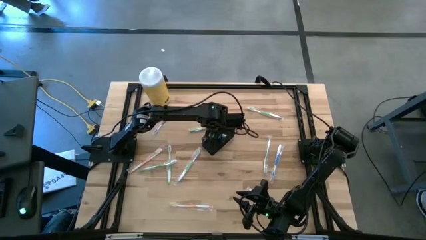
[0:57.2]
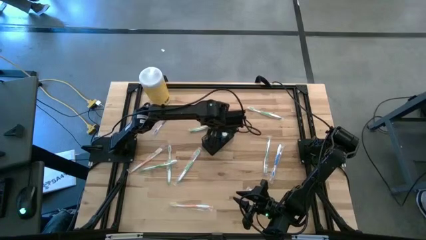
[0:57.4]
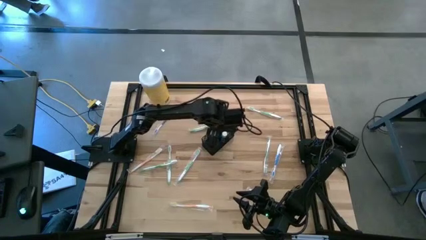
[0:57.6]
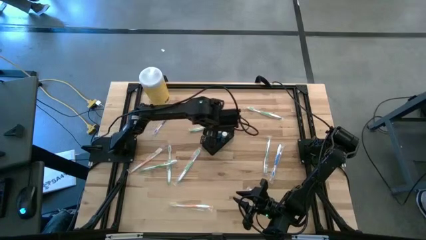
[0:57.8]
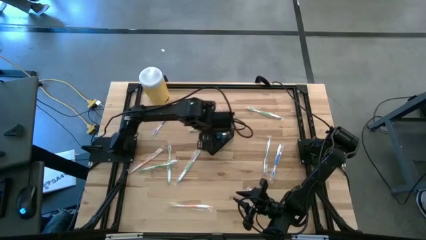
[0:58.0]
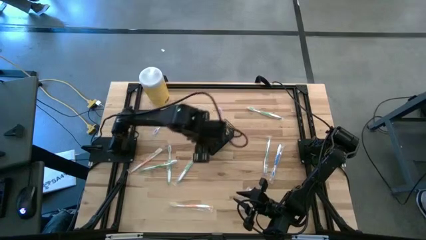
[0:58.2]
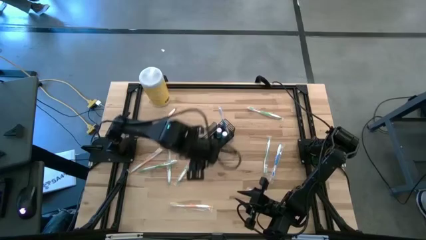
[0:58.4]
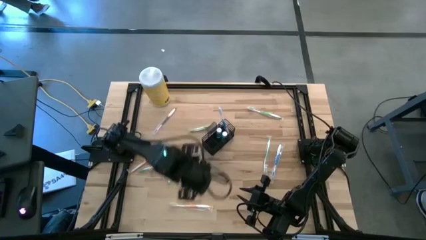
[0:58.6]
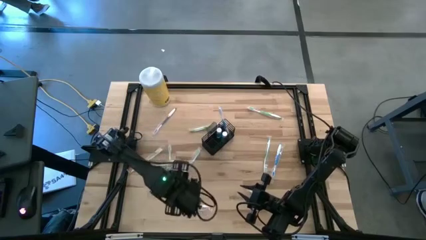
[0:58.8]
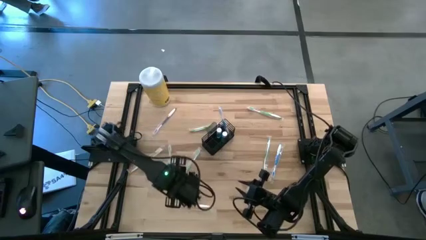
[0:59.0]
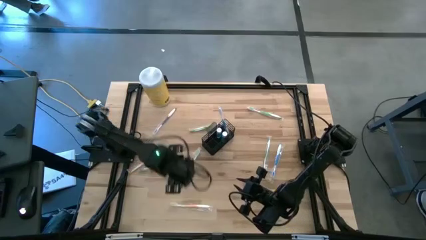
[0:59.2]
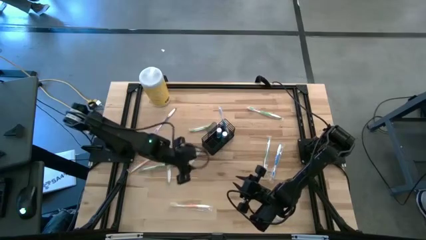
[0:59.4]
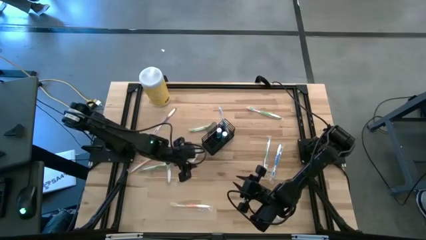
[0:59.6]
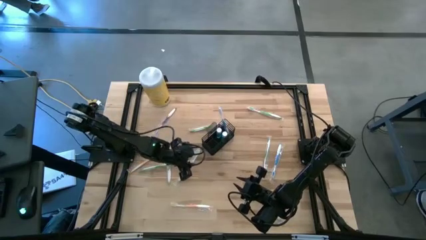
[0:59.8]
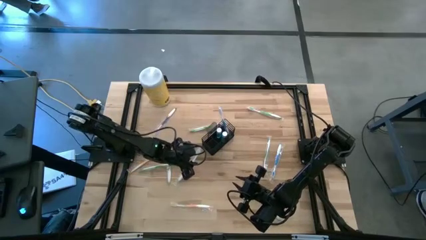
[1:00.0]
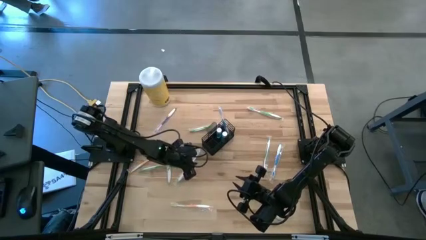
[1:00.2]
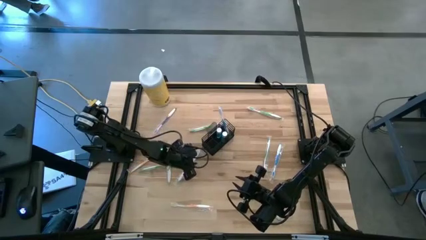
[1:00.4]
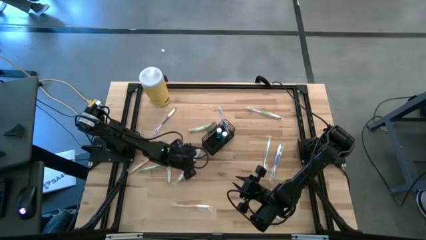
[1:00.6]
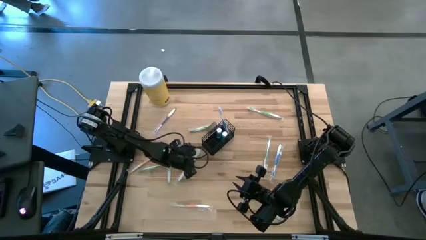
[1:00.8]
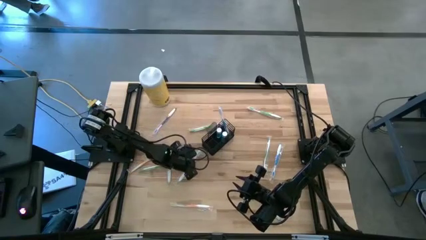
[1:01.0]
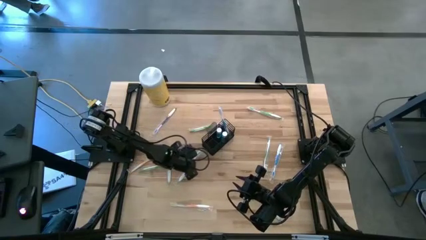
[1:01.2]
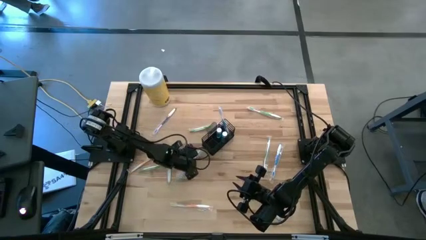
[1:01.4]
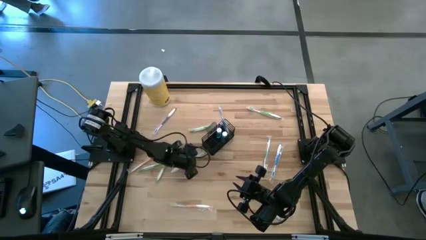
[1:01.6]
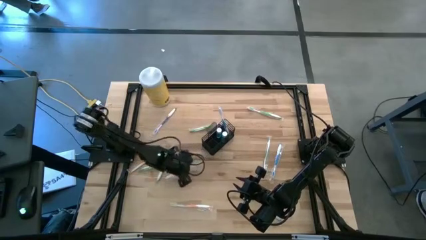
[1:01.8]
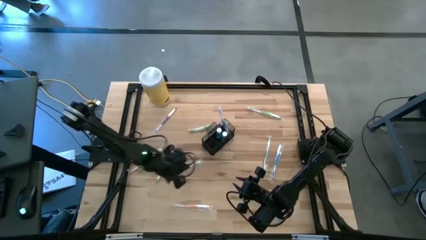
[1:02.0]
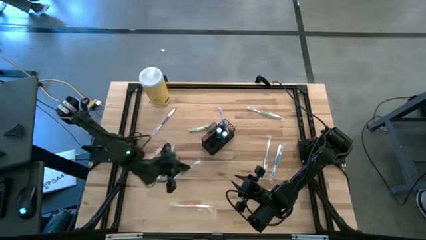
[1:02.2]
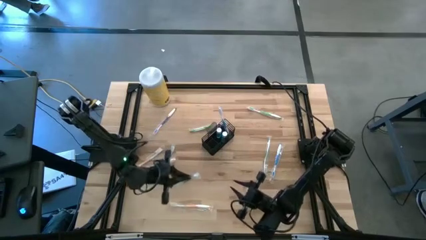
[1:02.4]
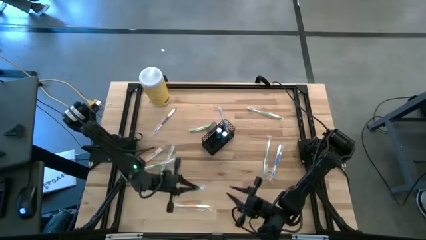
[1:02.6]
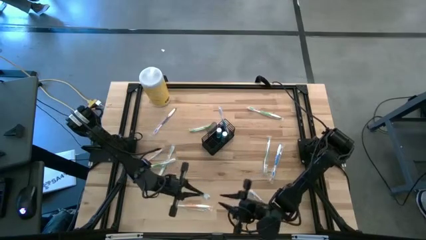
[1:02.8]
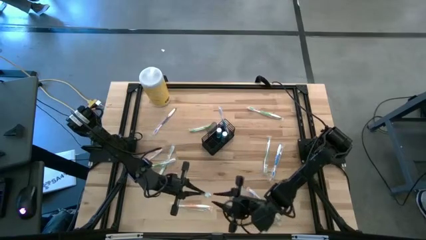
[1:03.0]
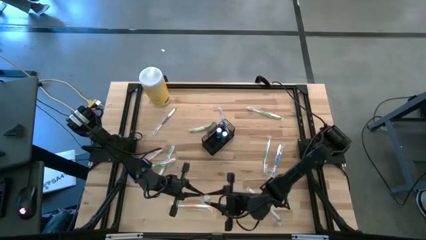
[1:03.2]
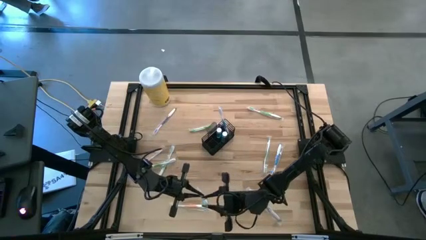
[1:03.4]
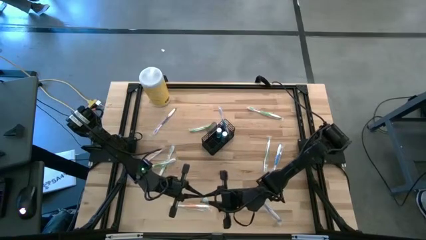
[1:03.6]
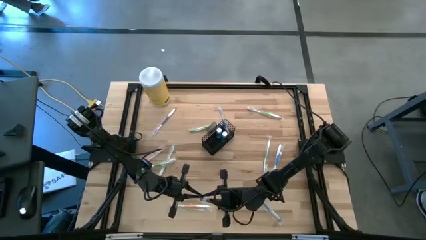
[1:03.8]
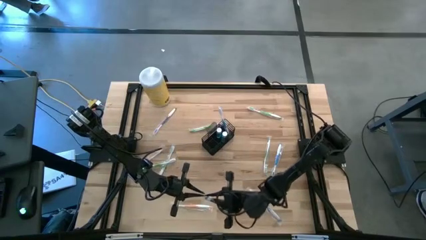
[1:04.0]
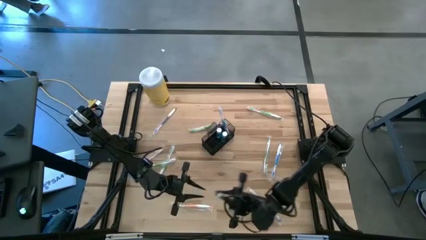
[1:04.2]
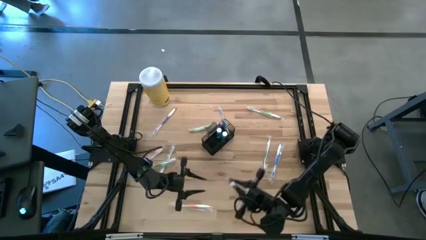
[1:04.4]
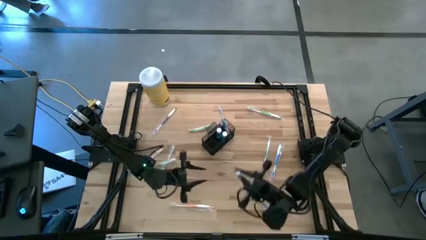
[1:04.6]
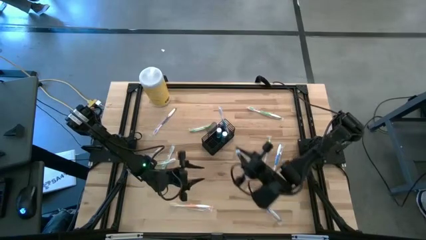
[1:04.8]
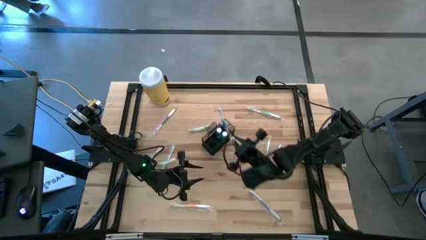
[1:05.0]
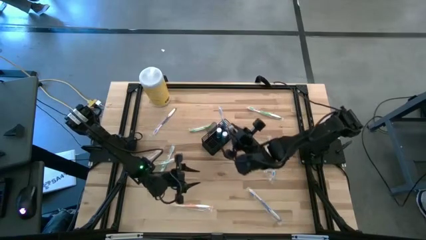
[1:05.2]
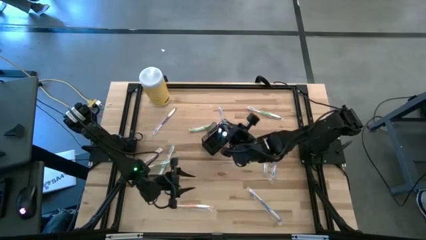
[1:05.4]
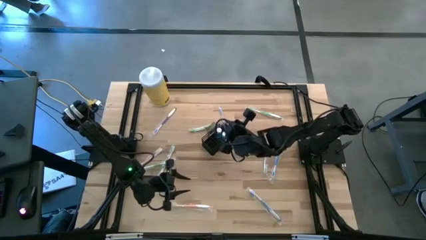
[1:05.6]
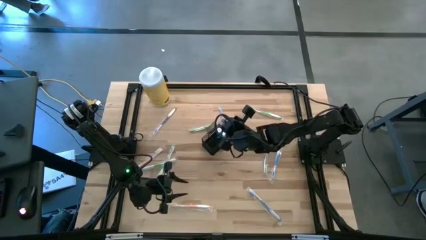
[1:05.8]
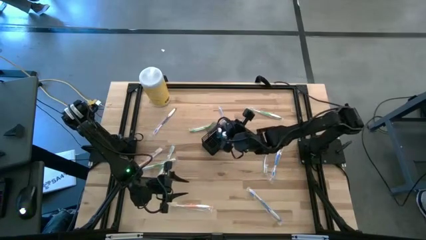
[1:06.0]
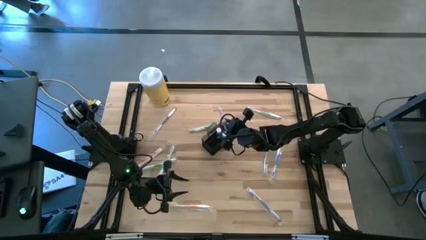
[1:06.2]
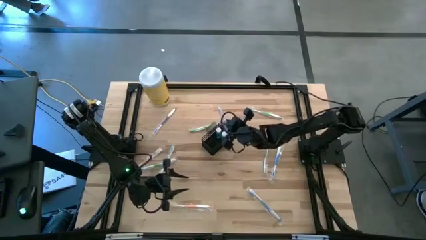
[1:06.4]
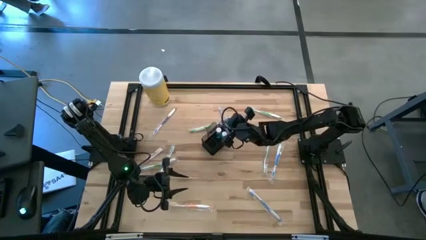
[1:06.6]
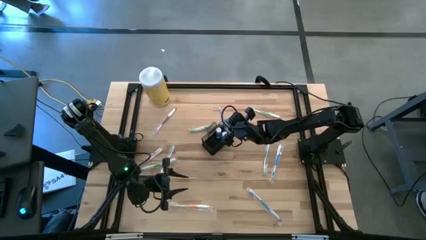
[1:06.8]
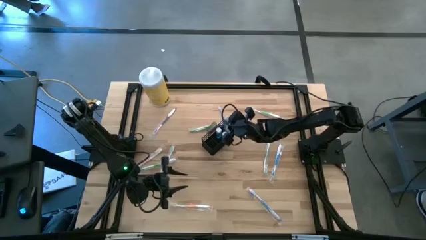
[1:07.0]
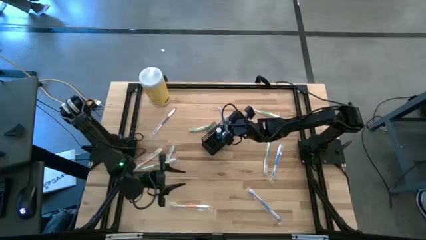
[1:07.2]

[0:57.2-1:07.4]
Task: Pick & Place toothbrushing station
Put the green toothbrush into the wire organizer

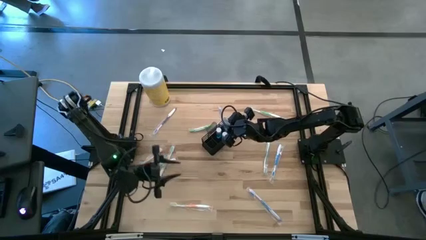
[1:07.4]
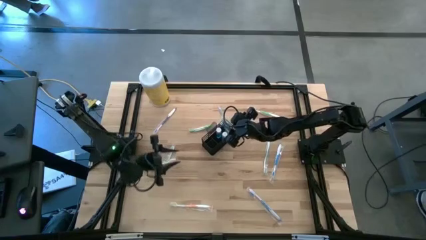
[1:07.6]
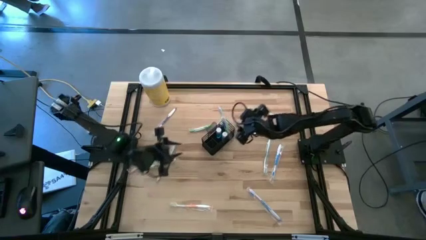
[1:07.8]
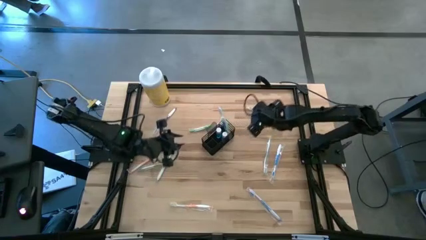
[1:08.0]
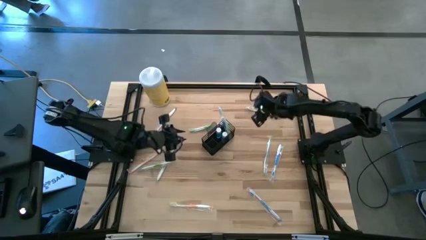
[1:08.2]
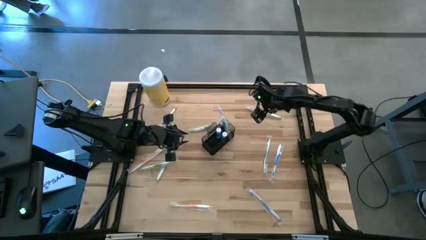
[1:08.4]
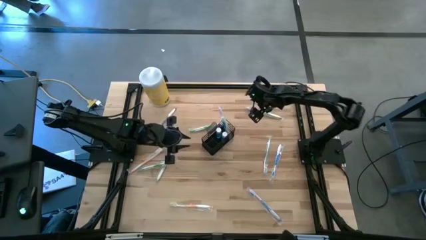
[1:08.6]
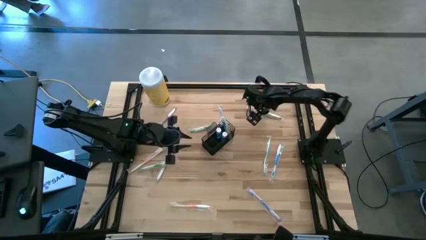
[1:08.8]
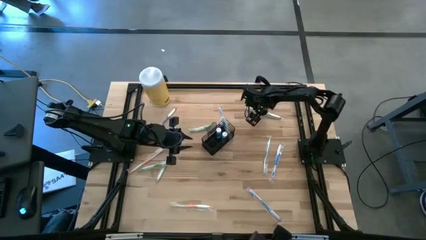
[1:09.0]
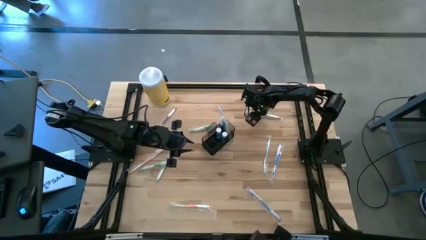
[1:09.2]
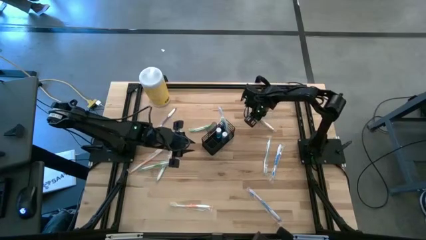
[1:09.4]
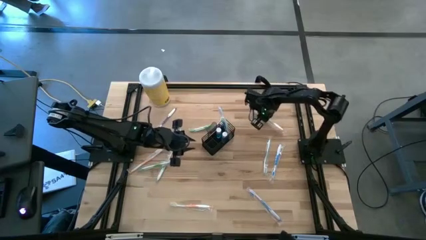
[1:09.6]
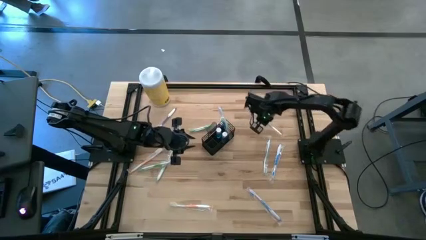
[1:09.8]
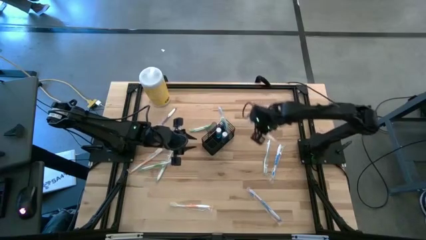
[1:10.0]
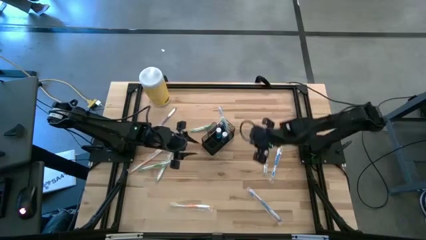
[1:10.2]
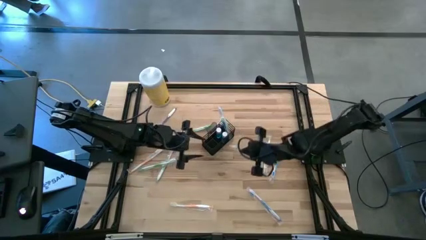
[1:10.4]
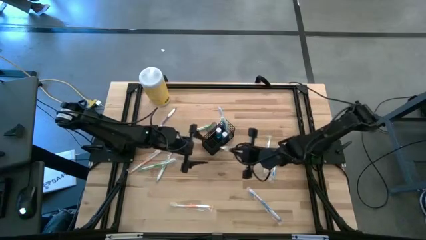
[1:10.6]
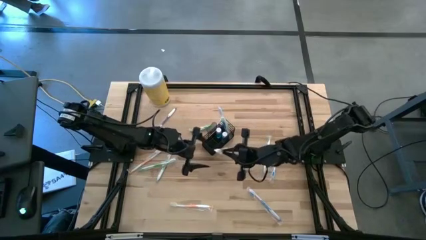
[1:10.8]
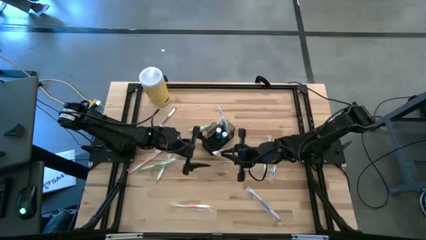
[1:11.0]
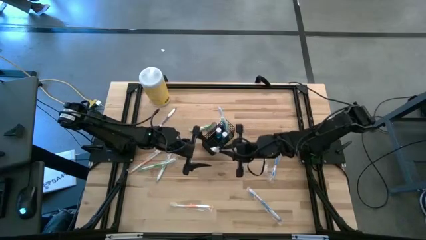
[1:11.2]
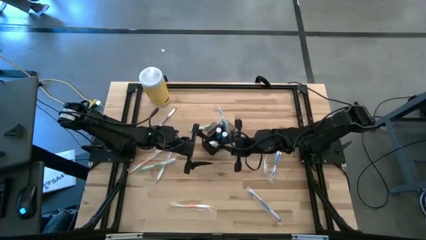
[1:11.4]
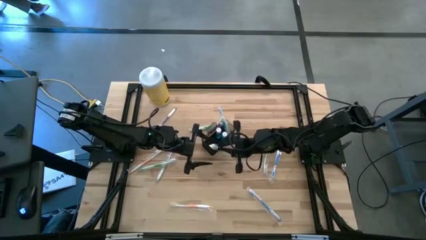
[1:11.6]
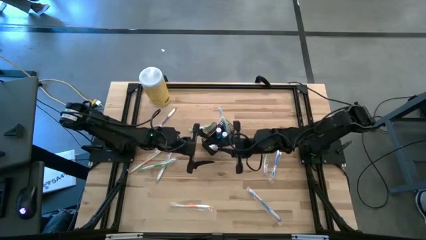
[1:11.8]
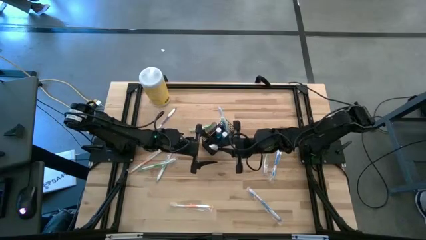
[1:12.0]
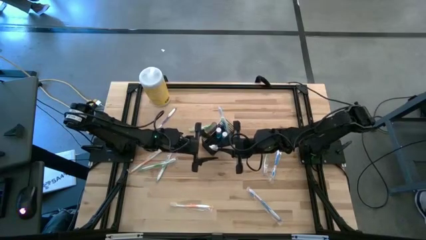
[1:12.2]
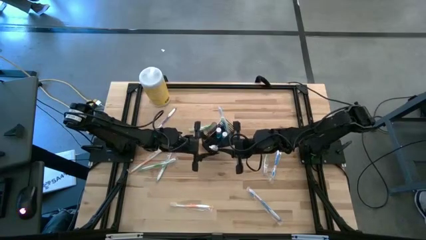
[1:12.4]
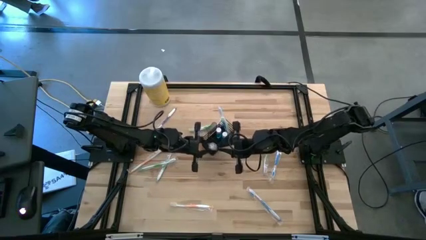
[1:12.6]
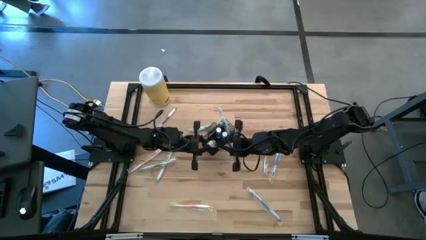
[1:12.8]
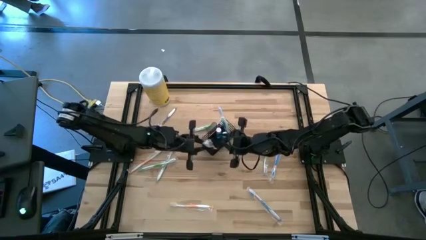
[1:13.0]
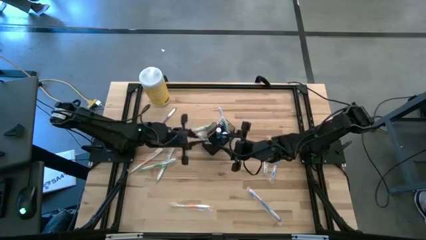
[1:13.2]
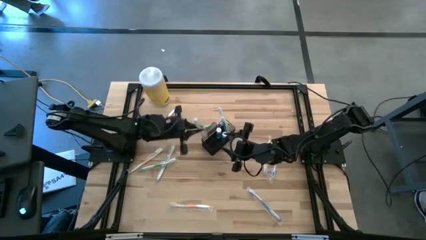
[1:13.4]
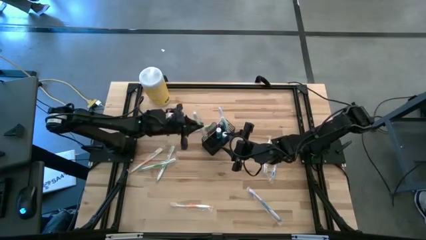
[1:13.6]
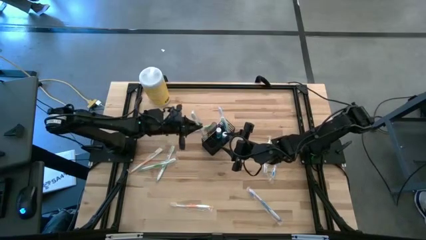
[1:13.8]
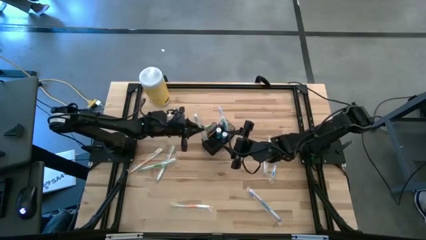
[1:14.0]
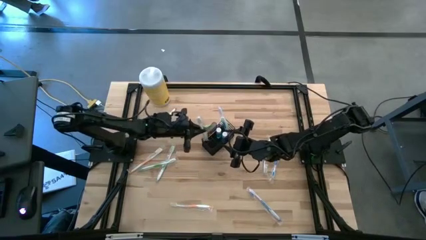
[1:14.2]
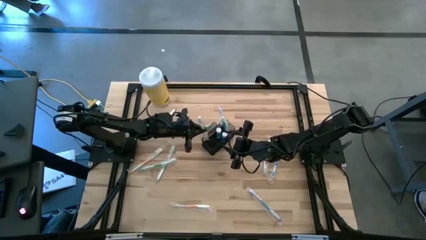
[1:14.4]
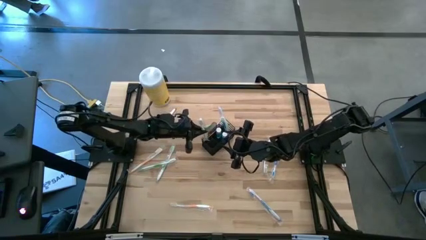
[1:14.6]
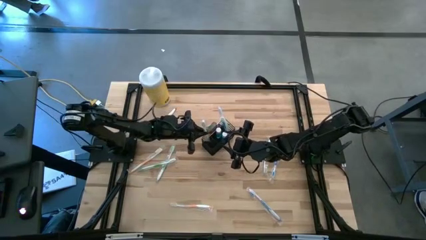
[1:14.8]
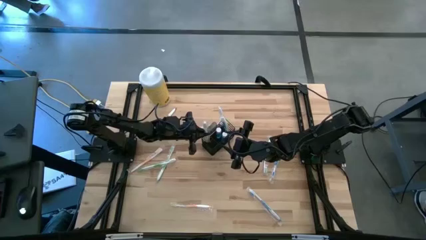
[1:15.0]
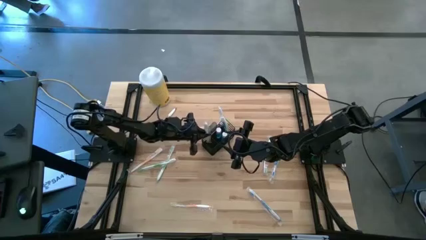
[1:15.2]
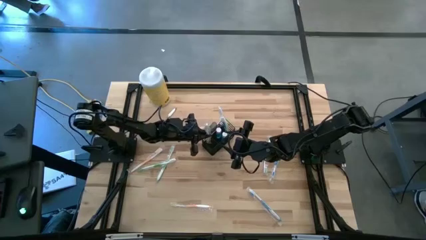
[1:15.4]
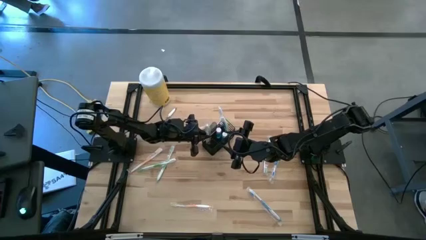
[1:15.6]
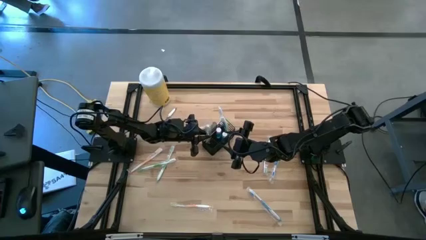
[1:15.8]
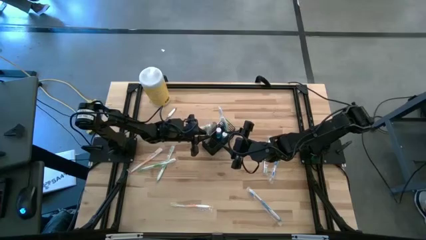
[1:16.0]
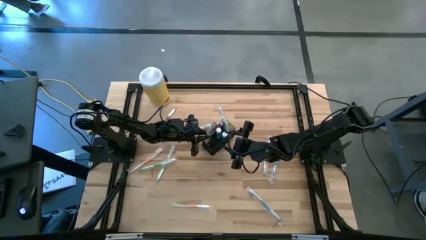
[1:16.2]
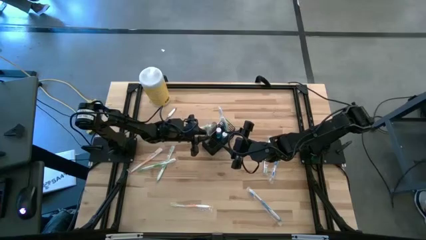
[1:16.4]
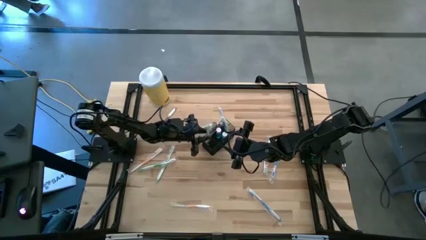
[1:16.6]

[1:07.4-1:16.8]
Put the green toothbrush into the wire organizer
